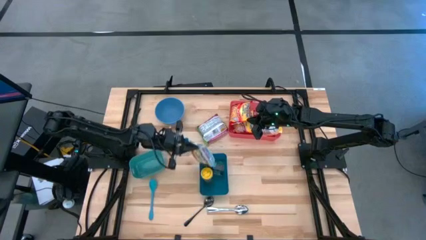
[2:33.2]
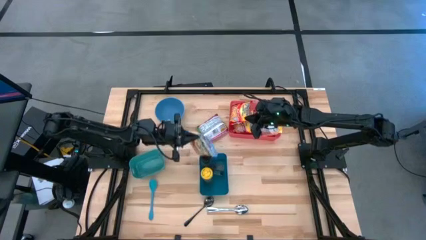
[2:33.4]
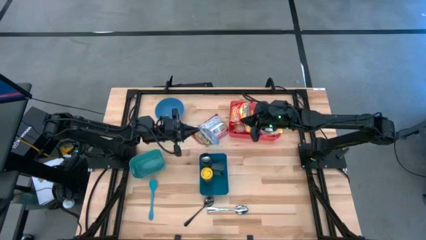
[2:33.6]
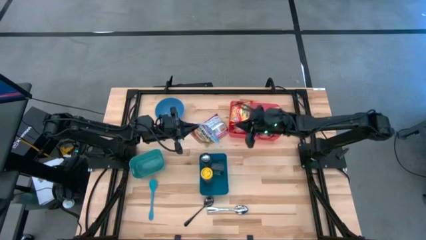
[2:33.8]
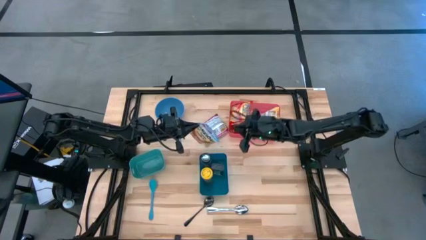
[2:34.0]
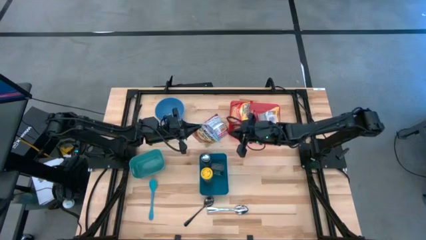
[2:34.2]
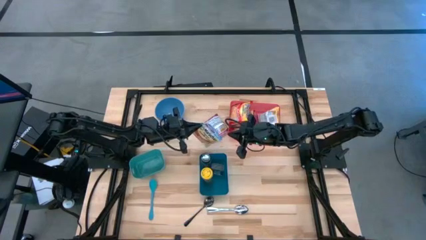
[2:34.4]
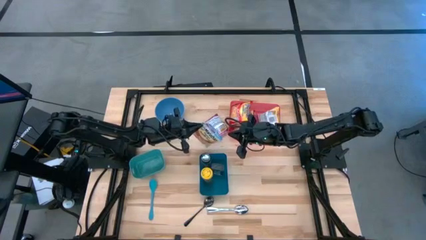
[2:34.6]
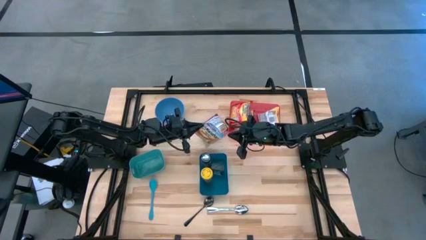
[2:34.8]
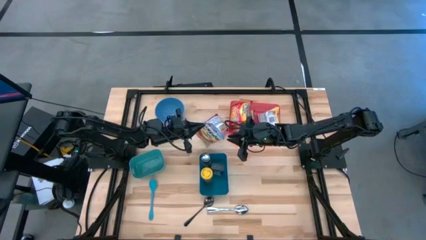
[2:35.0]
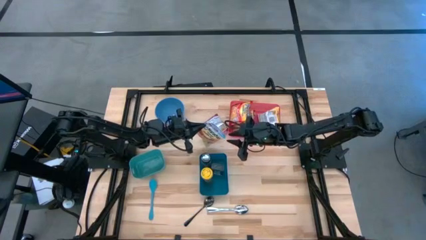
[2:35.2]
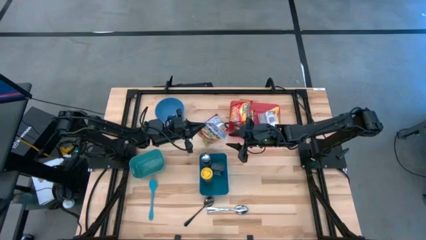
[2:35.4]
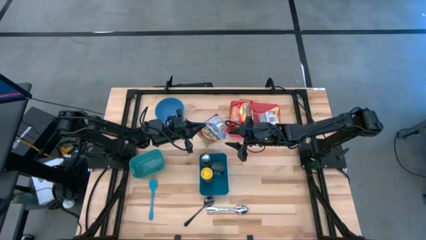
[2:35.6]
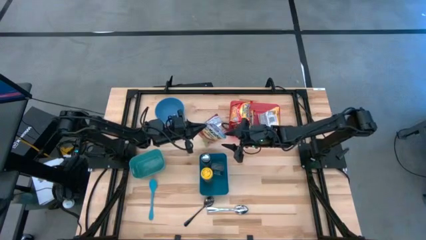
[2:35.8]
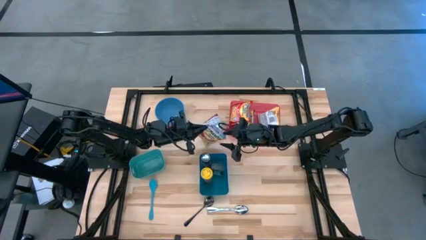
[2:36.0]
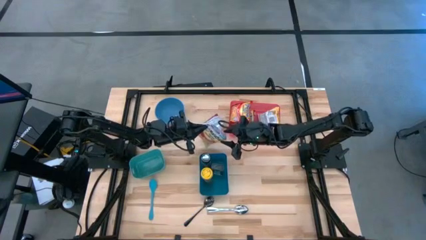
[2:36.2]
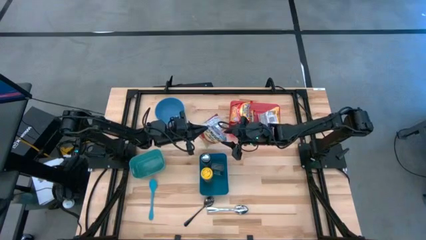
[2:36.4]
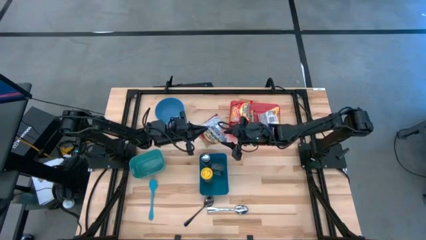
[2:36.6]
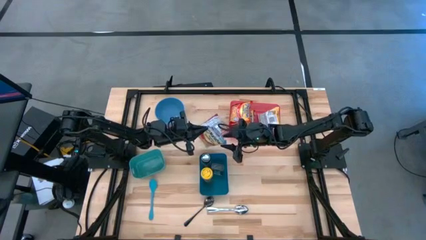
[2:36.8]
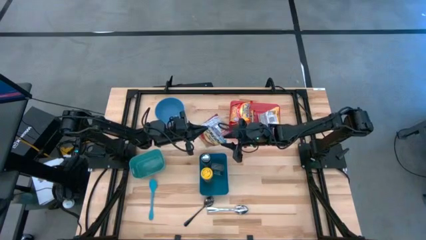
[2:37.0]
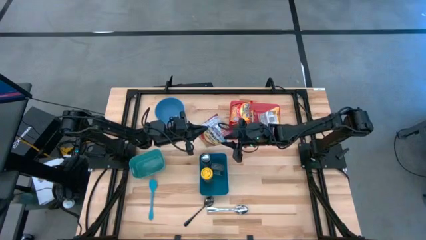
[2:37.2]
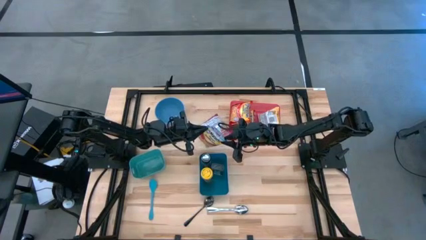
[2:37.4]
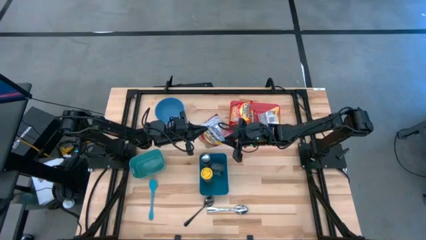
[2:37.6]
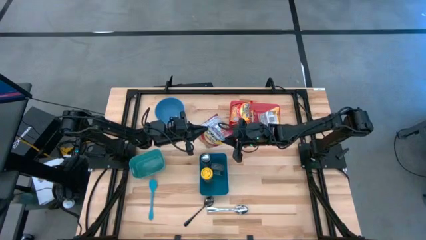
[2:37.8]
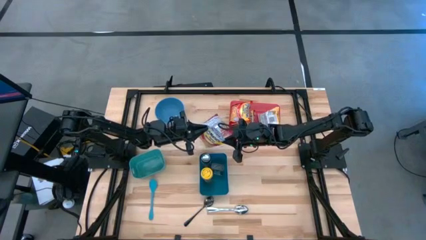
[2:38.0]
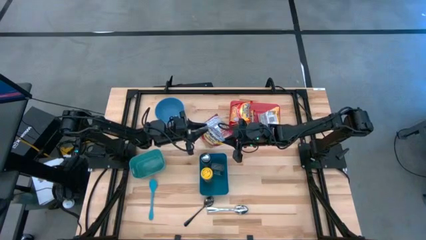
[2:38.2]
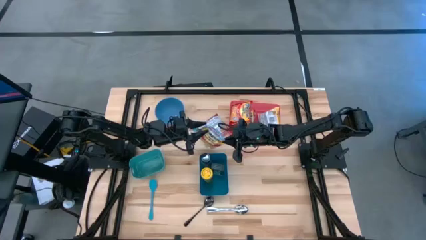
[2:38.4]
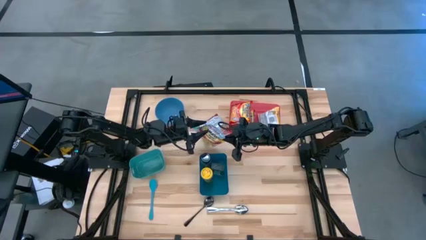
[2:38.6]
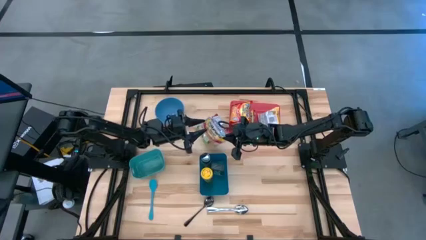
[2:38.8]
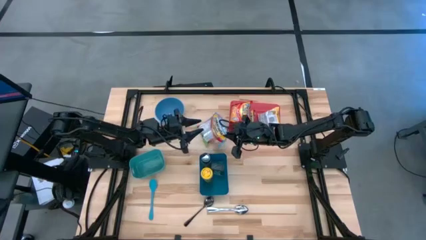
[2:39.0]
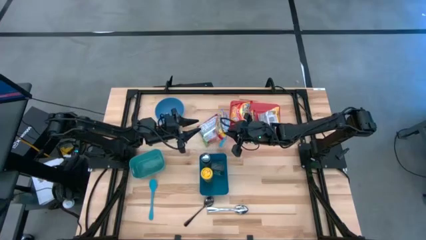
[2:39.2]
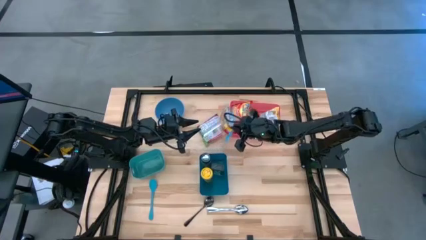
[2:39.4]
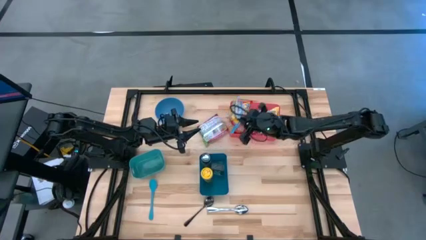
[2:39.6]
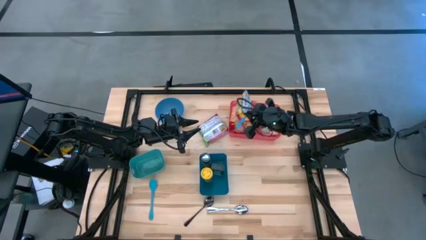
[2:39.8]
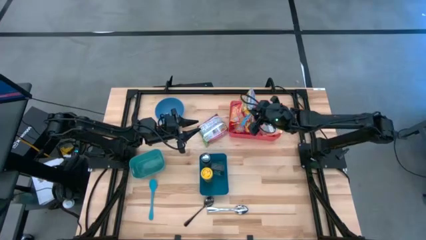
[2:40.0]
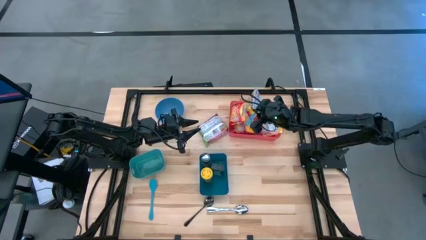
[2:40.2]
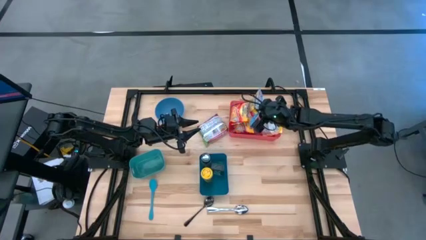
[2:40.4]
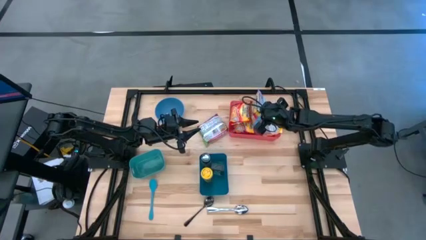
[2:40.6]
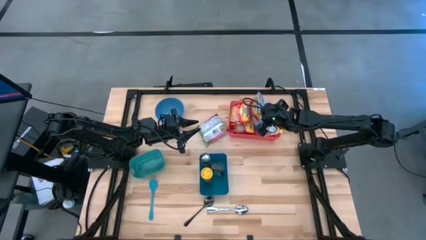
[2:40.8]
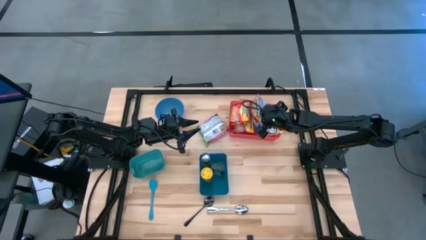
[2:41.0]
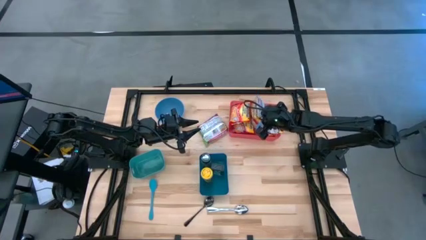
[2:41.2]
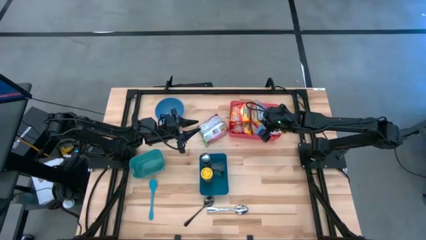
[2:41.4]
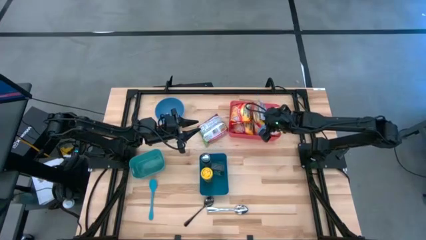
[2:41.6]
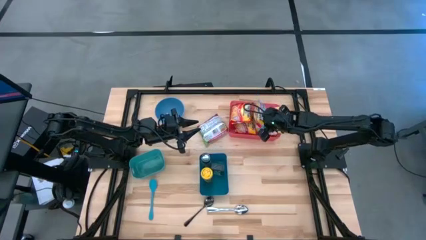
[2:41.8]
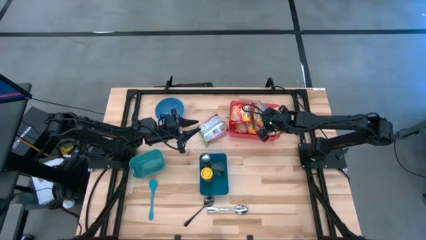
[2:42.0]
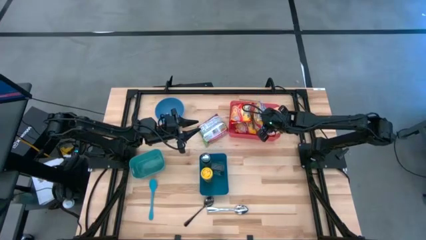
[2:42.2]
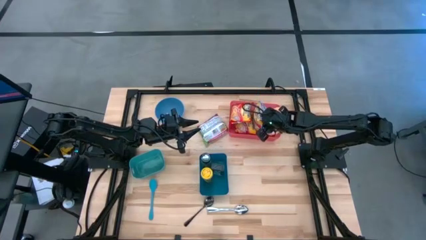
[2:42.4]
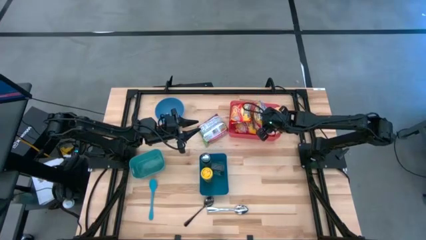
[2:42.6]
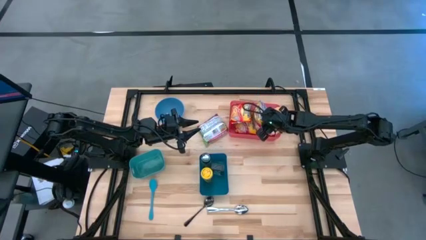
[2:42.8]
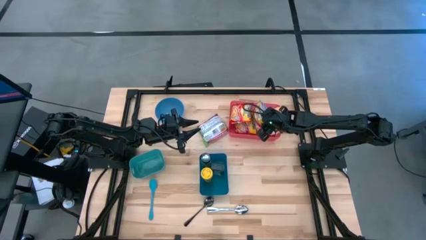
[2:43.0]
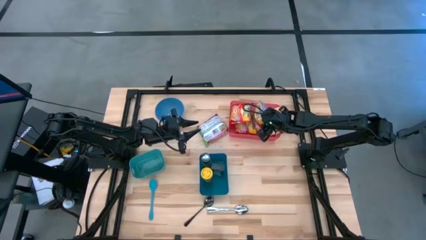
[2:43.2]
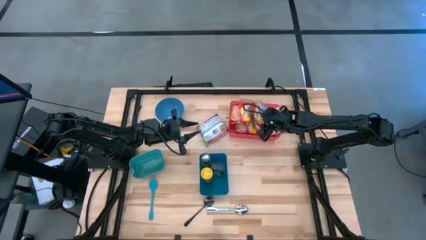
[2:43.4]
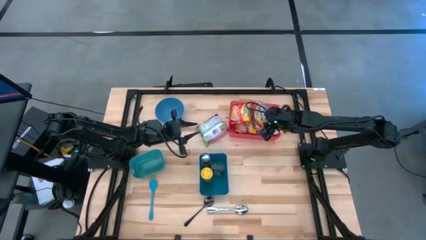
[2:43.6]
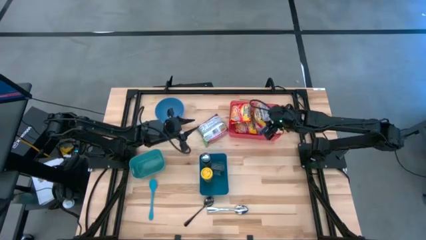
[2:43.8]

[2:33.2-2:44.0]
Task: Pick & Place Food Item
Put the light blue noodle pack into the red bin

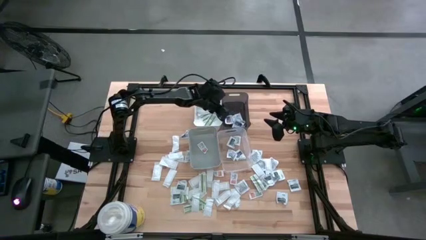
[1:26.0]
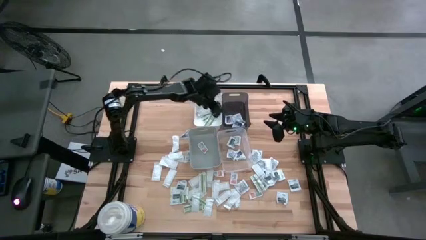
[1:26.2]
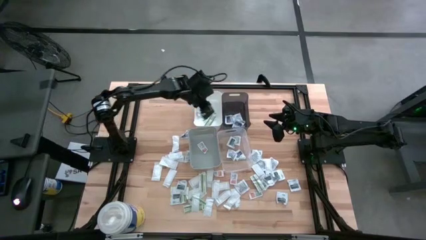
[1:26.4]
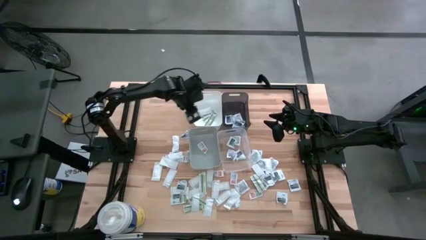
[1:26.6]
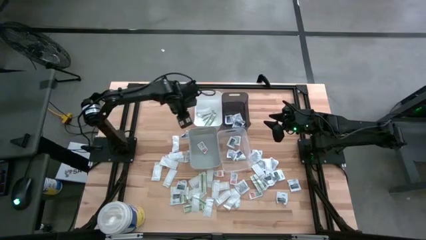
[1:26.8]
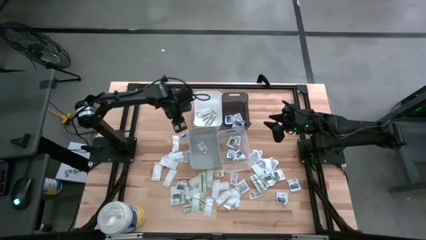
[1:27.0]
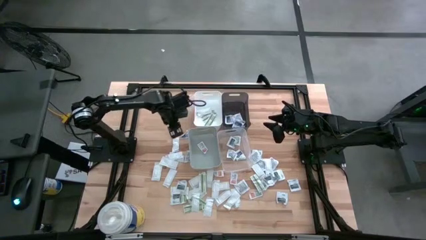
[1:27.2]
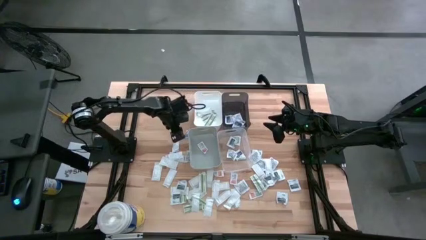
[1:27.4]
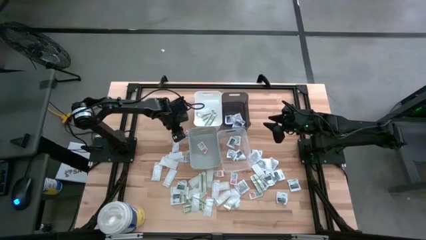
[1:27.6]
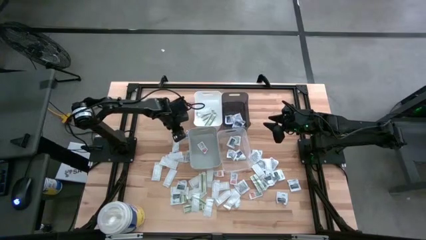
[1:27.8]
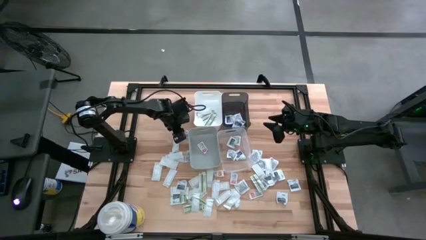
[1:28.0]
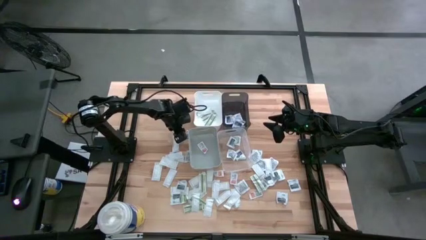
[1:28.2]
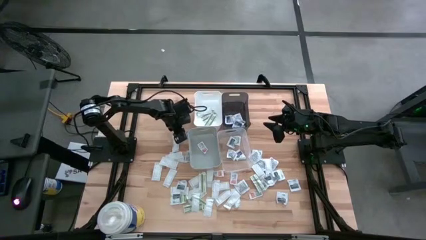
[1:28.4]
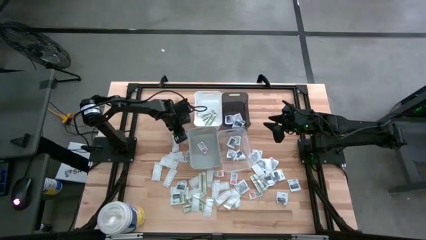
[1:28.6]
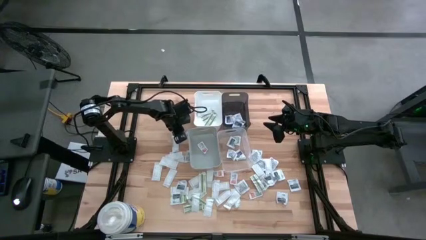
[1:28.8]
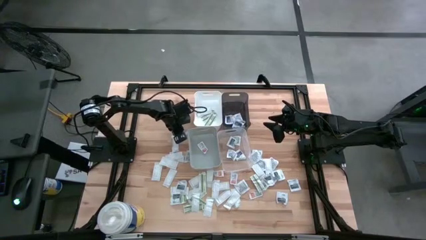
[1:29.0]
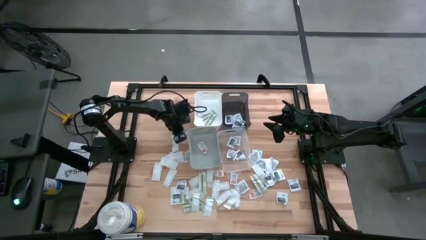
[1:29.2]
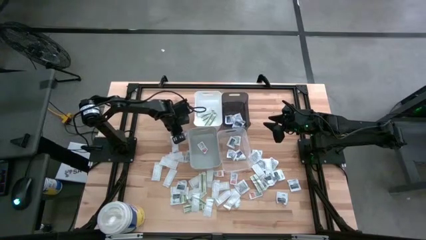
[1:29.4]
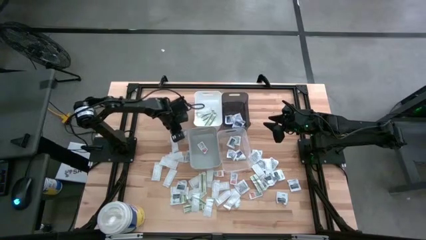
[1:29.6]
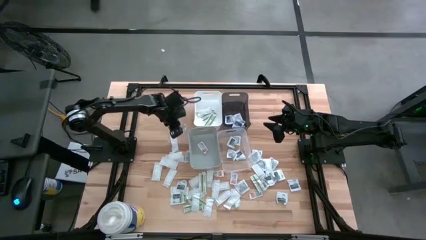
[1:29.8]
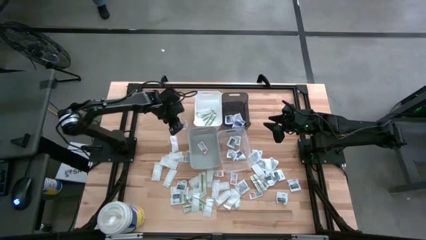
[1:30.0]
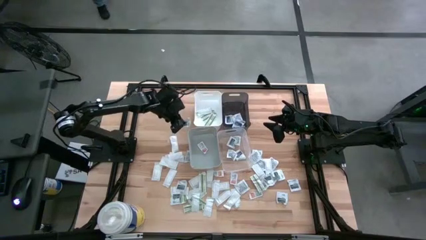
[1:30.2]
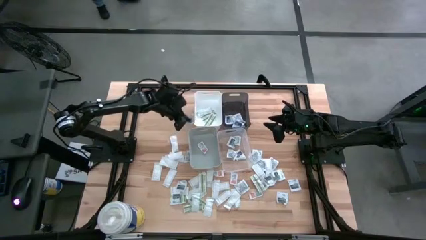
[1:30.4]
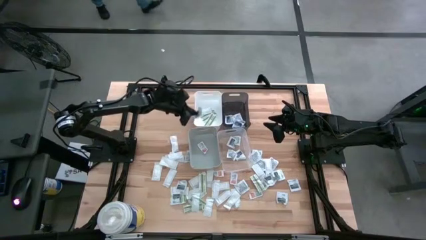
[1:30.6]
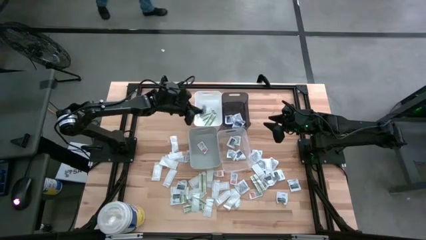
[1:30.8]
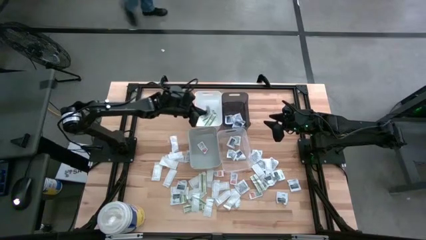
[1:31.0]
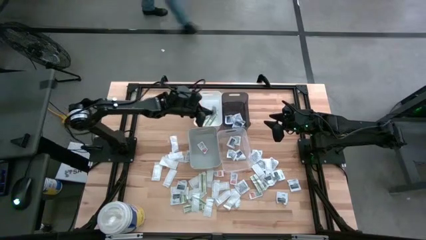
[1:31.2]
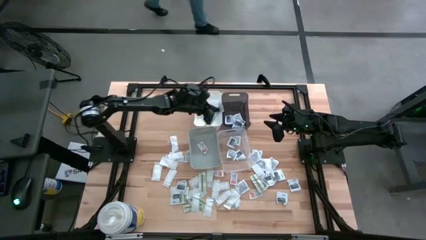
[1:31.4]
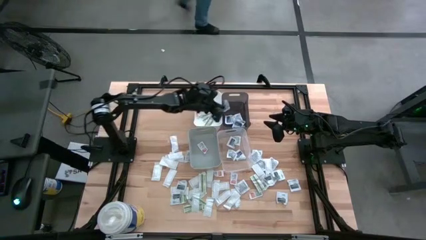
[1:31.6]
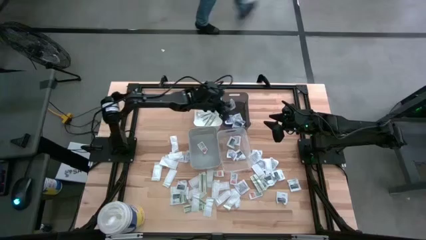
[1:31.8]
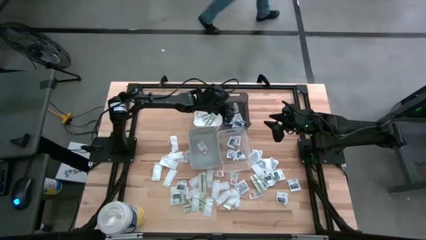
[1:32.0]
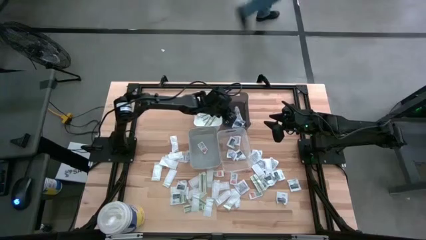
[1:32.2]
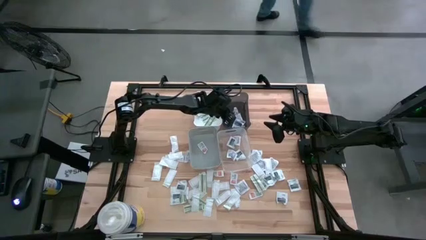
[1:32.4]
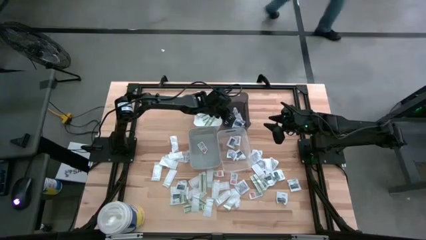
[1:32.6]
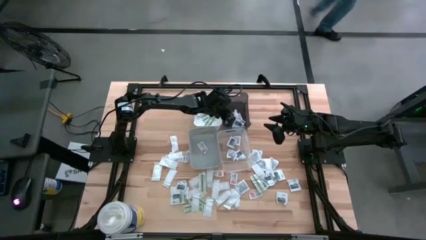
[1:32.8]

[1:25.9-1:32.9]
Task: Pick & Place First Aid Supplies
Put the blue alcohol pad into the black bin
